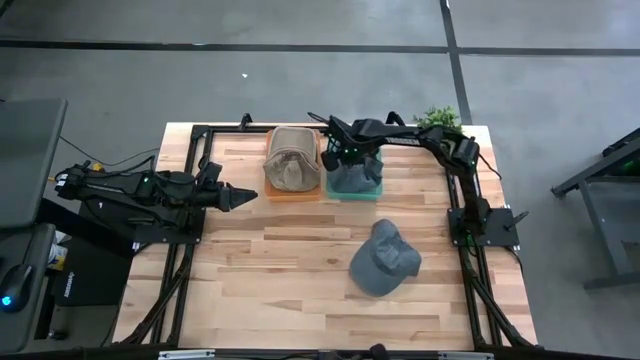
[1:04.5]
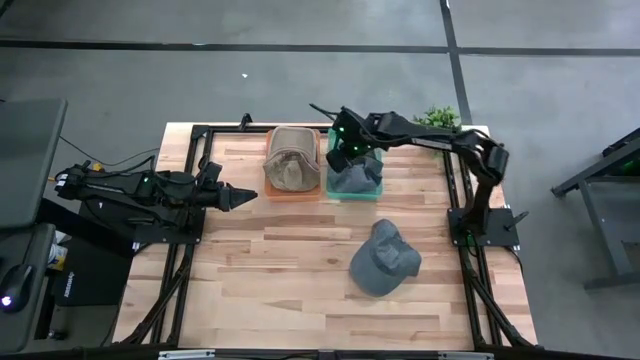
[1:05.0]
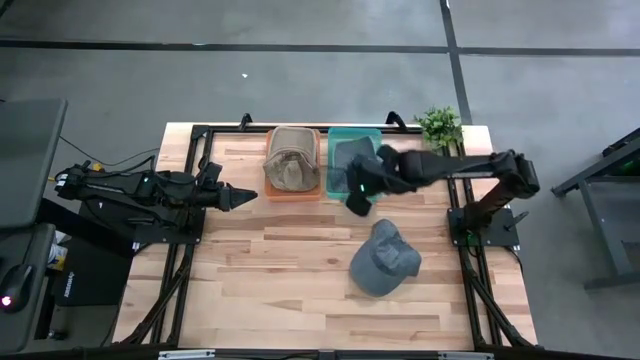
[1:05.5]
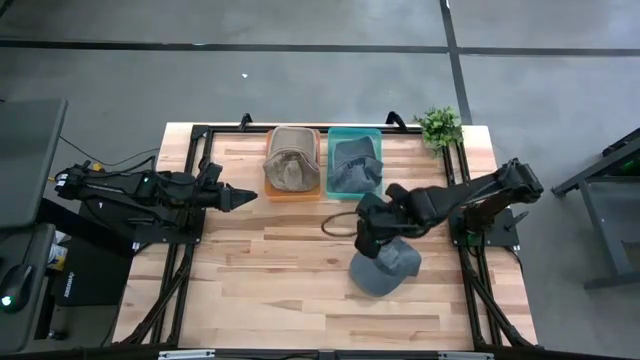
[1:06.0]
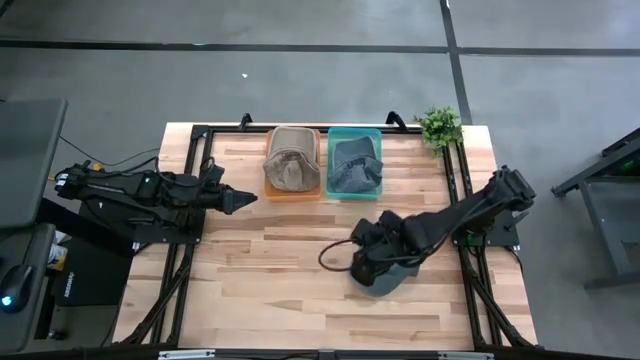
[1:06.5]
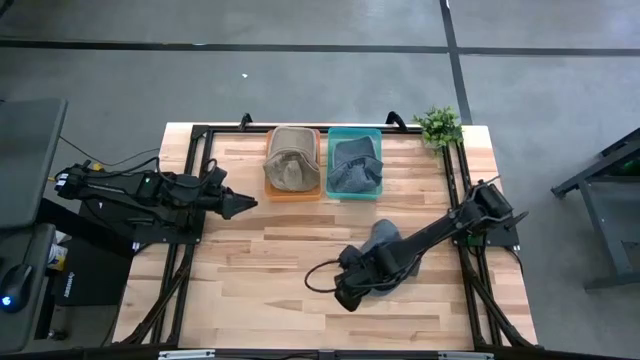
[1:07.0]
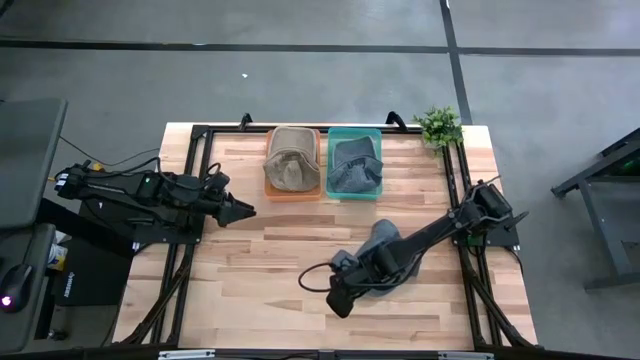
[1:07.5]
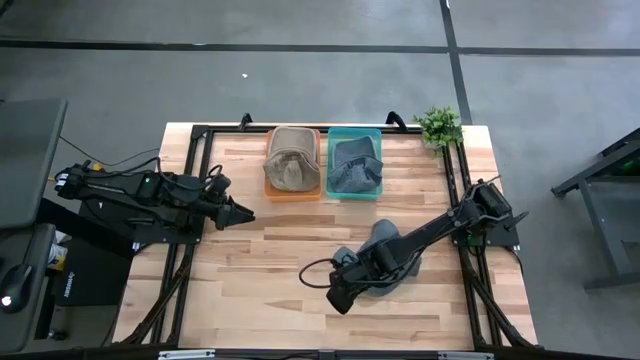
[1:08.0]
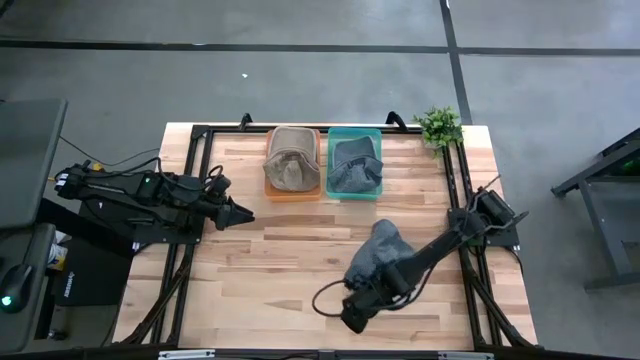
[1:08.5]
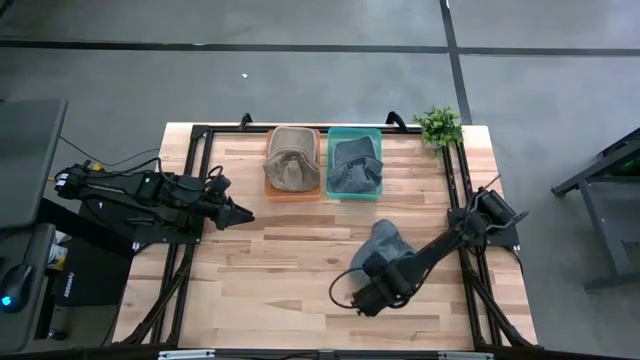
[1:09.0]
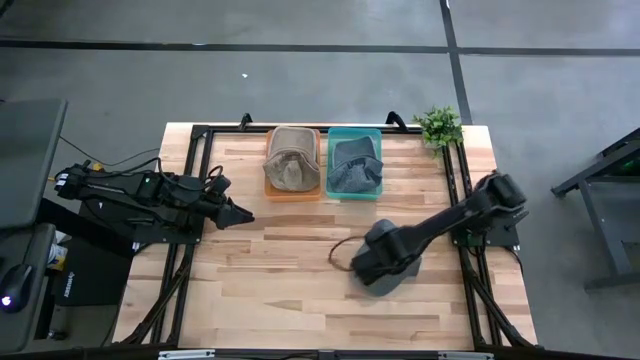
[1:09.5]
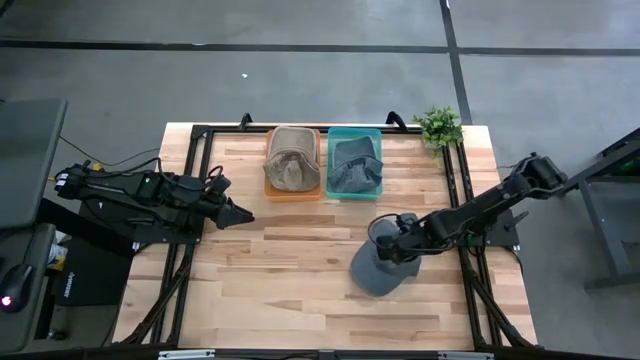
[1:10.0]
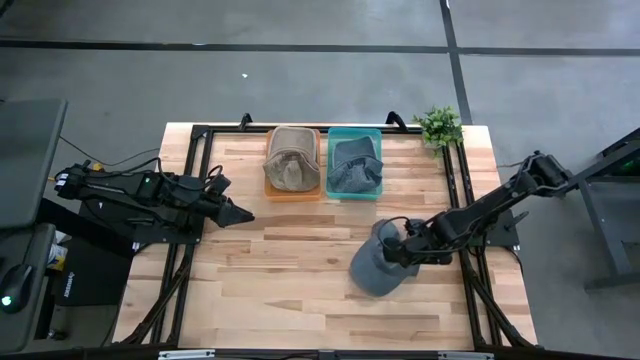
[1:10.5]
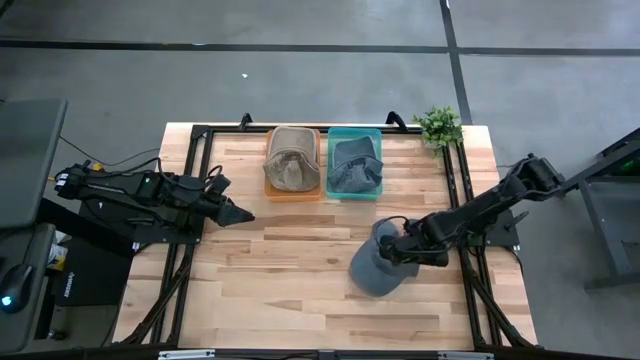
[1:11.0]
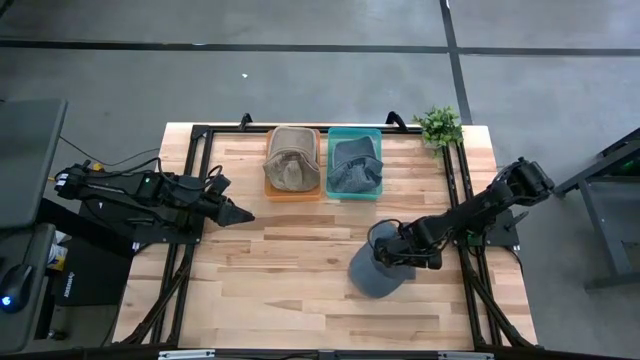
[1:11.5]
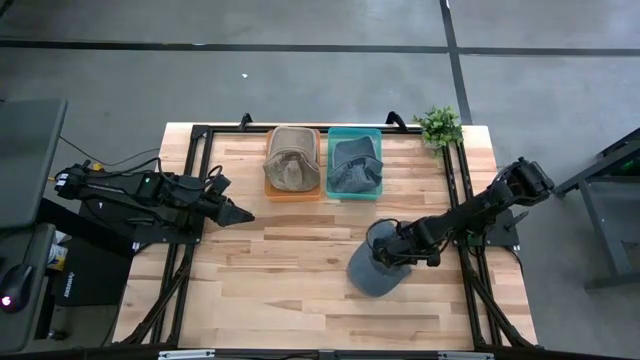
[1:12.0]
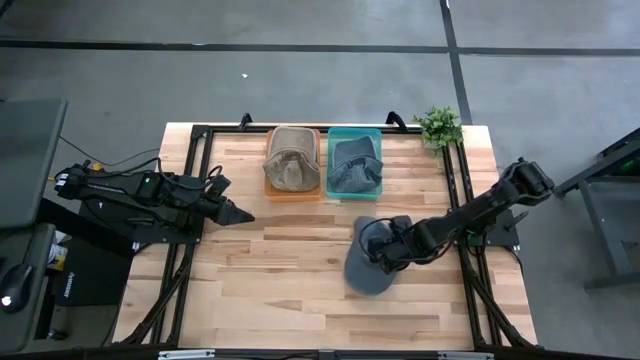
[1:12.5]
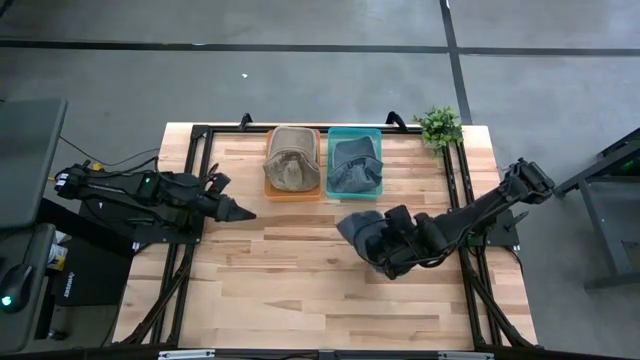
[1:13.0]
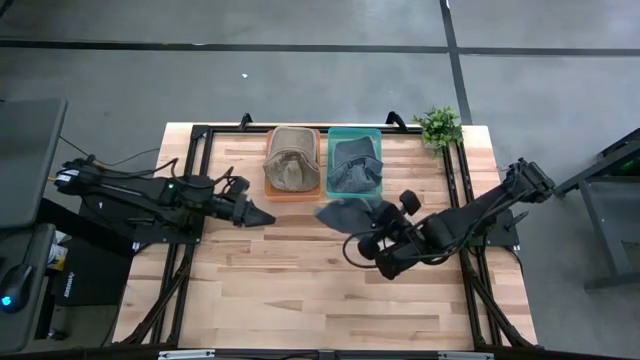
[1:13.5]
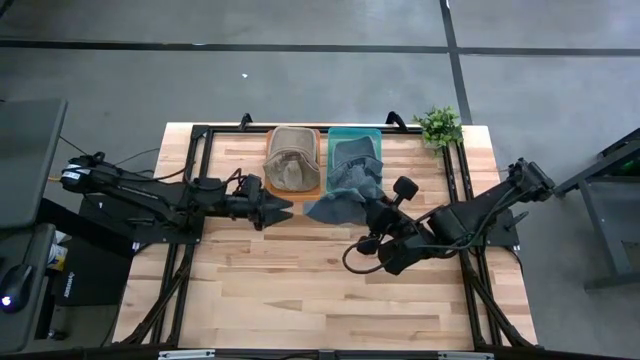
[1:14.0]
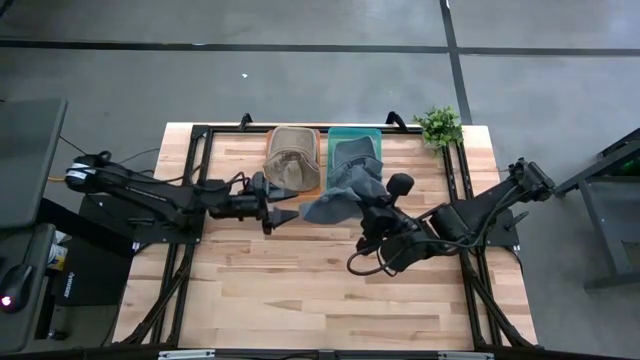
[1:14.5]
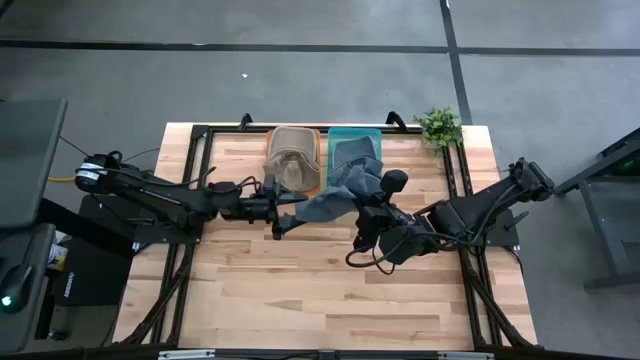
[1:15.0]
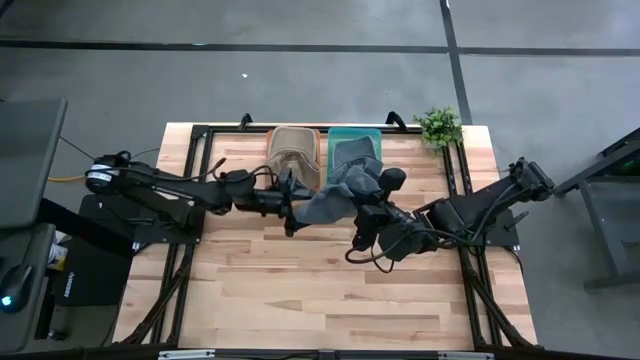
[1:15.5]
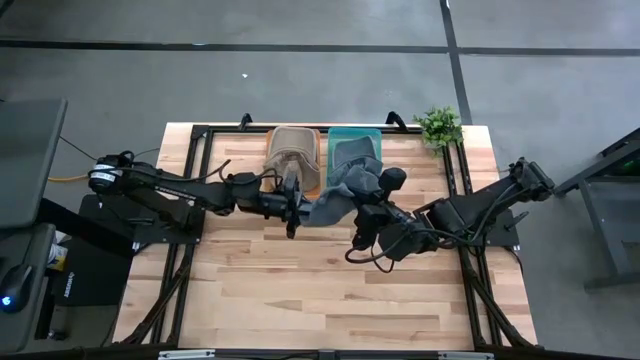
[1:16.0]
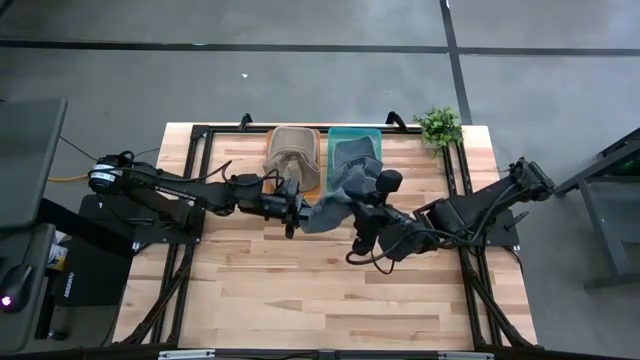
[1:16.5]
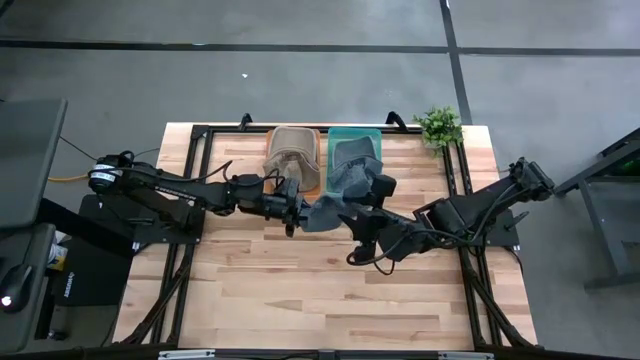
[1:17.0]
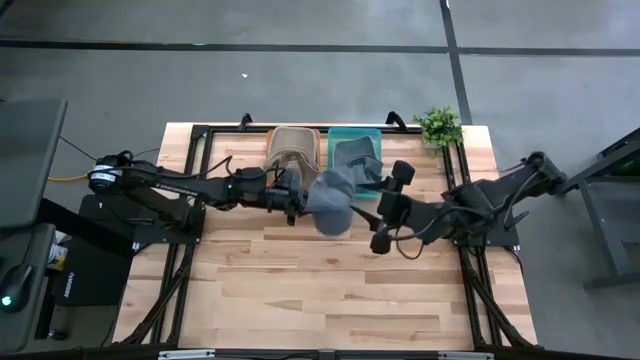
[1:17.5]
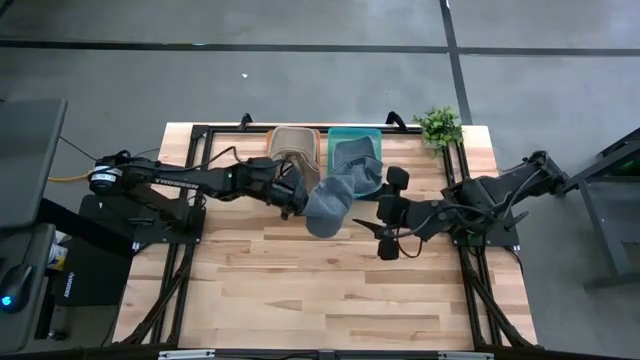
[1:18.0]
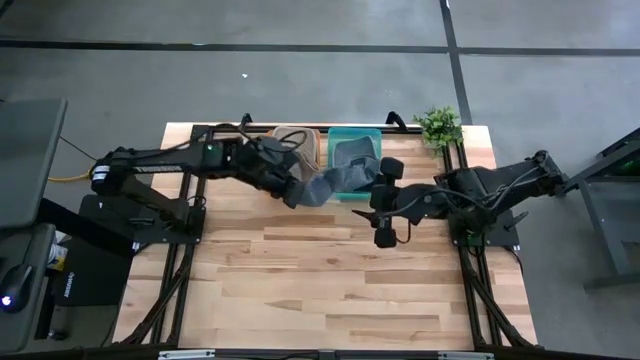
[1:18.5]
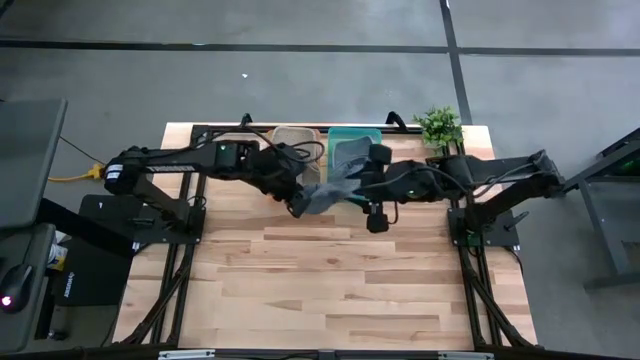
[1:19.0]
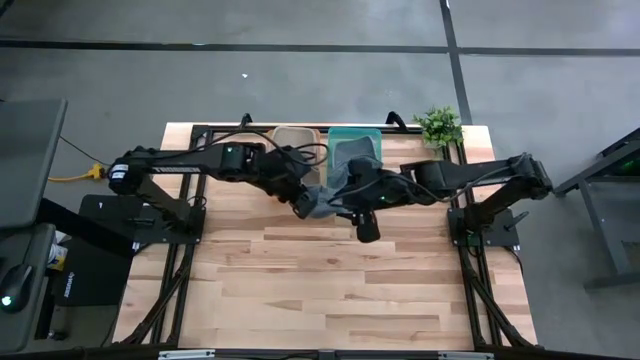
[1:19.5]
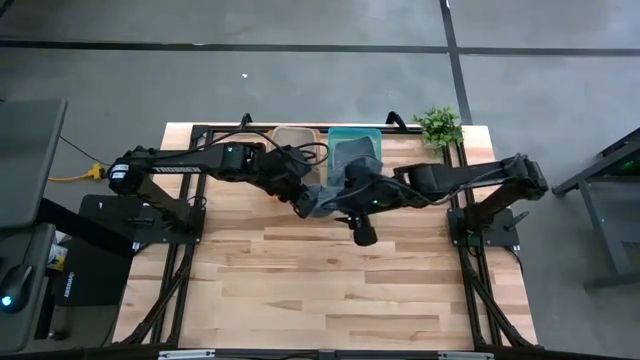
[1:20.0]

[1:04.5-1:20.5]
Task: Pick & Place hat
Put the black cap into the blue bin

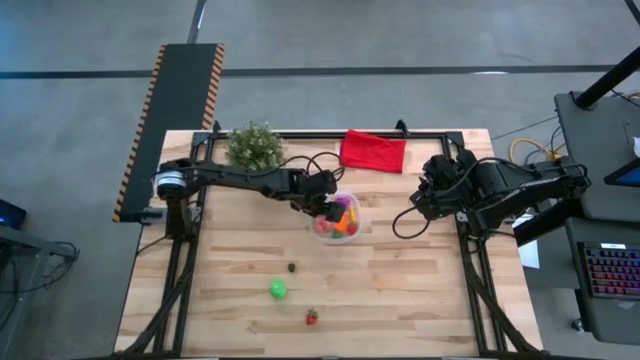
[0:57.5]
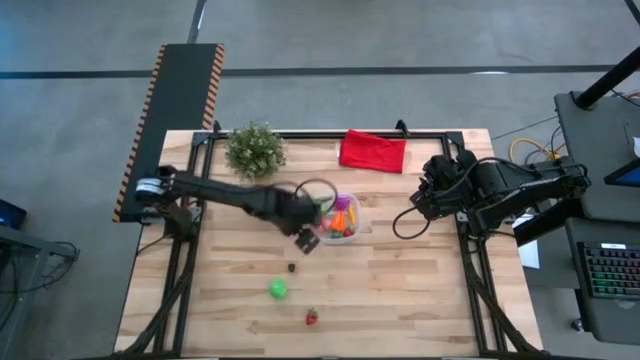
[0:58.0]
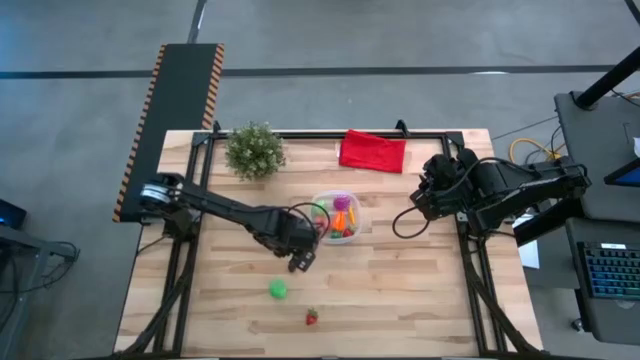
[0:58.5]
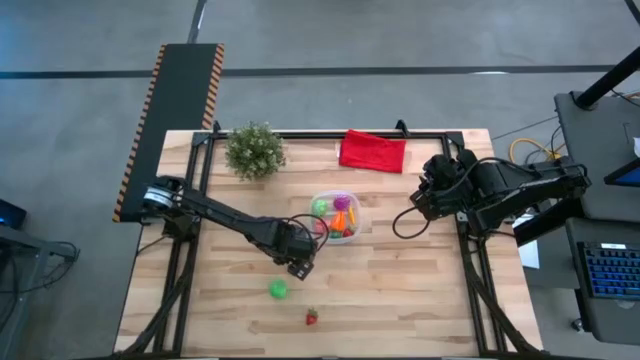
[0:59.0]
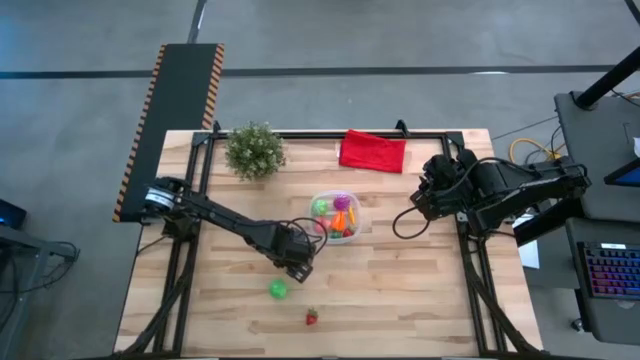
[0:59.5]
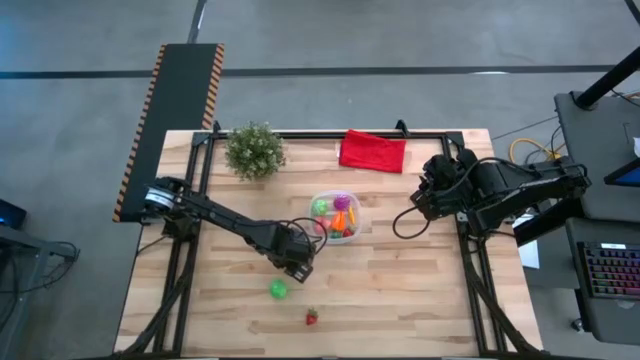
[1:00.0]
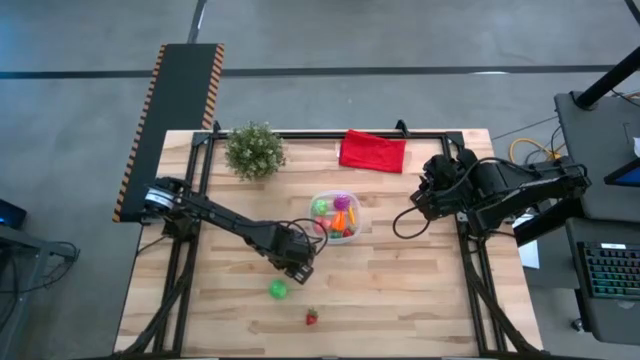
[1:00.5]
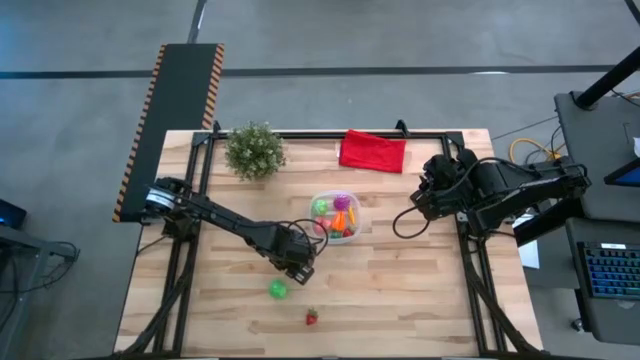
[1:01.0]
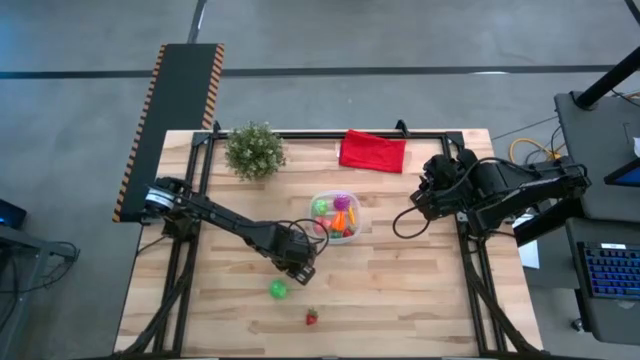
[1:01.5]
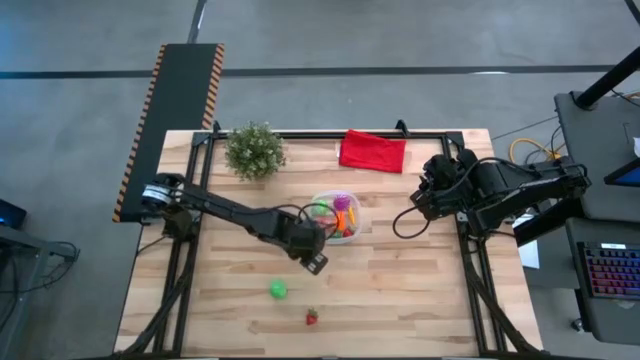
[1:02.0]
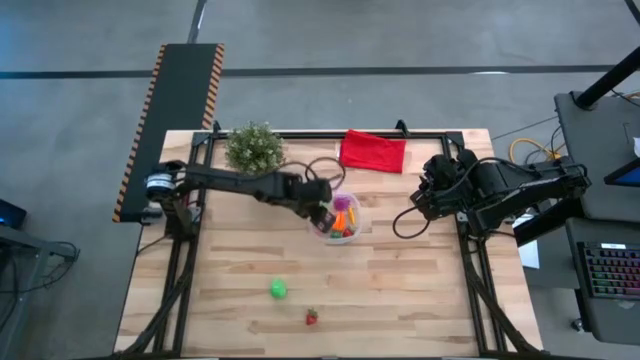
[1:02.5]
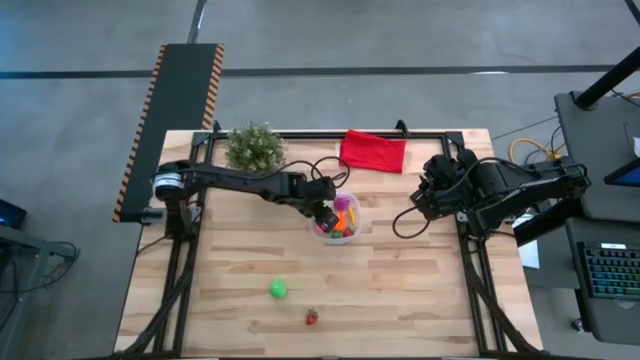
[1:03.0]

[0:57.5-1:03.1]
Task: Pick and placing Produce into tupperware
Put the blackberry into the transparent container
